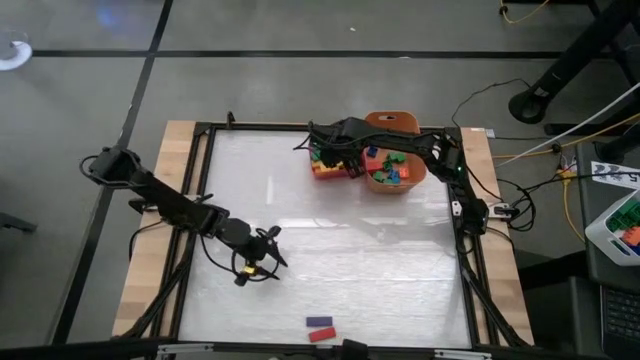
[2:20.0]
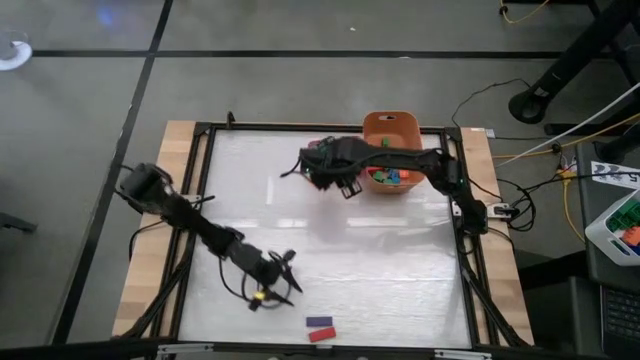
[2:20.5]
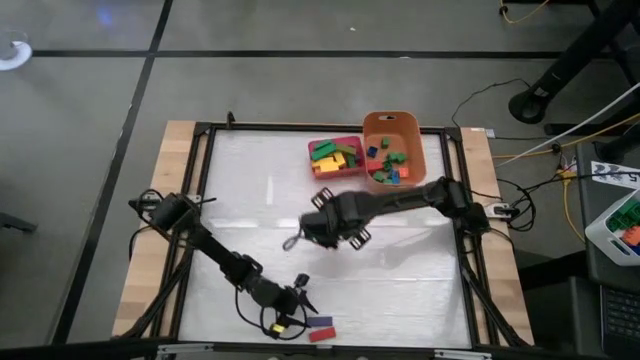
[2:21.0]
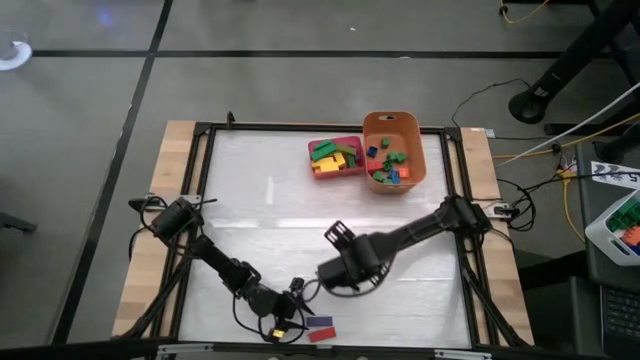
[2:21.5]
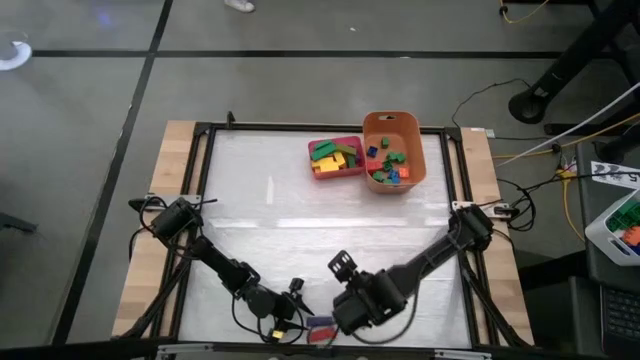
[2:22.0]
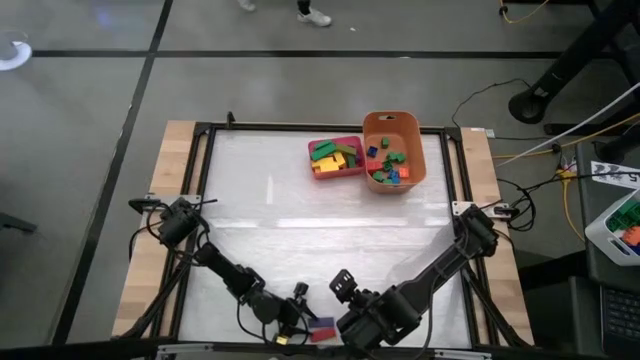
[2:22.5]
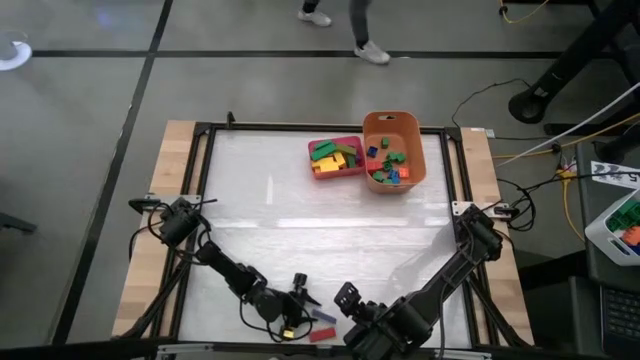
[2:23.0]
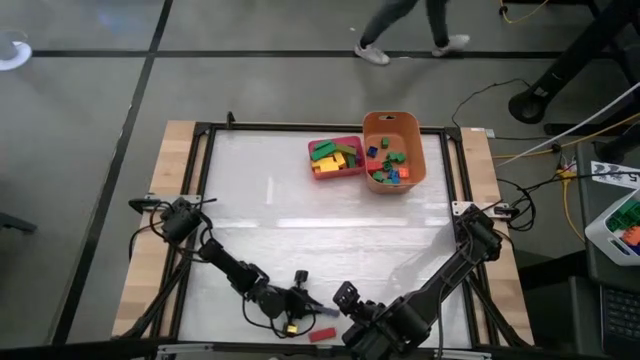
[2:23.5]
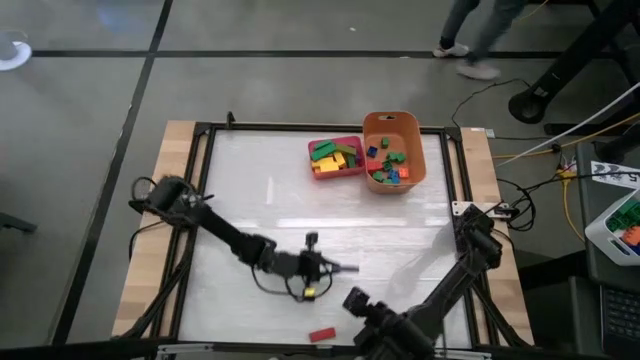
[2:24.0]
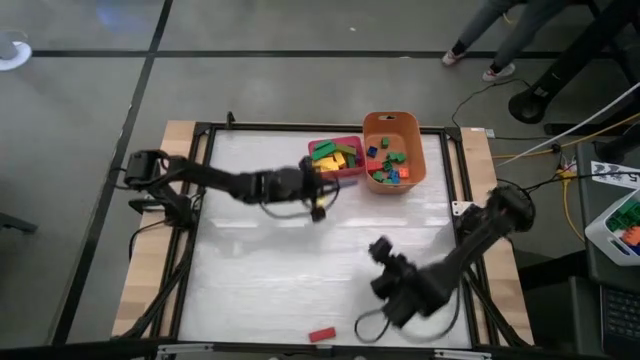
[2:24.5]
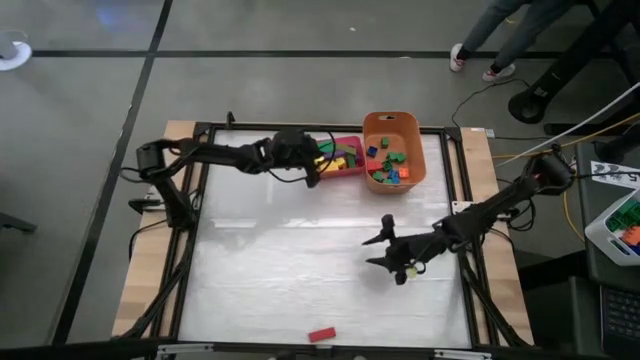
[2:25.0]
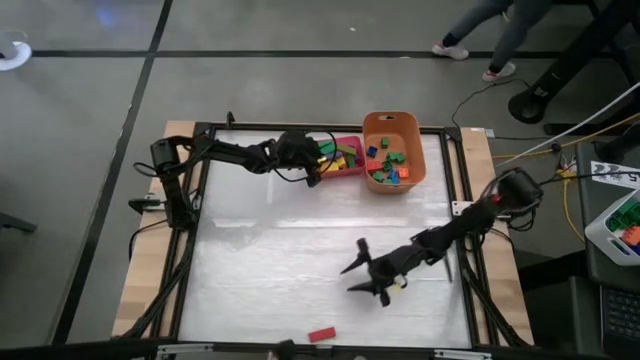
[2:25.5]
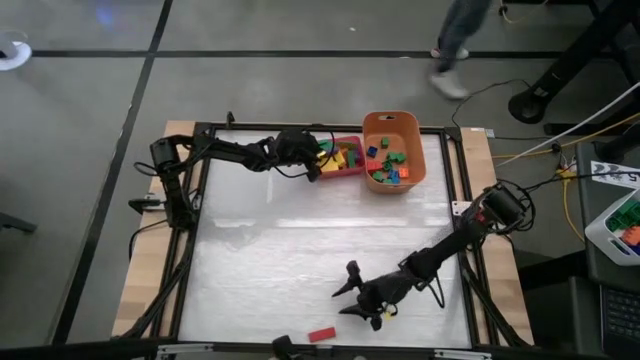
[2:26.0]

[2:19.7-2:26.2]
Task: Sort blocks by size
Put the large purple block into the pink bin

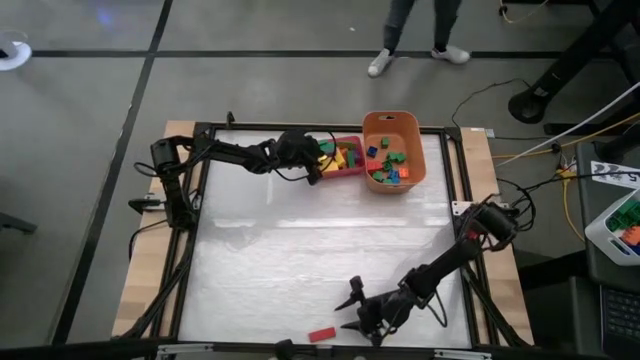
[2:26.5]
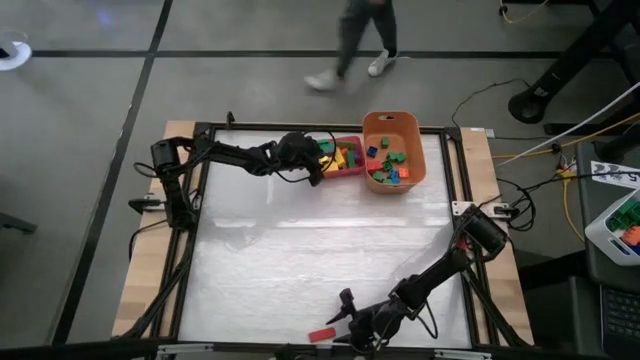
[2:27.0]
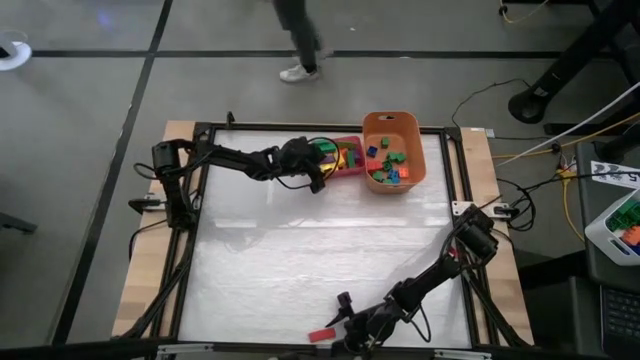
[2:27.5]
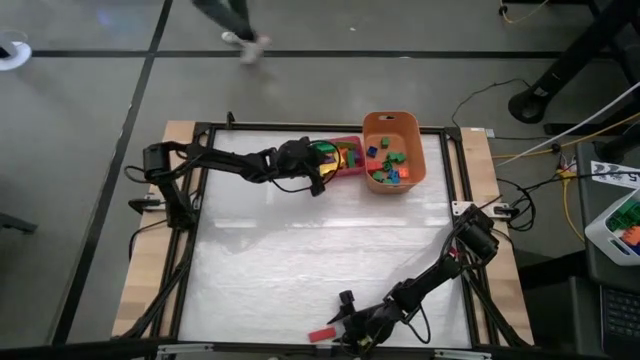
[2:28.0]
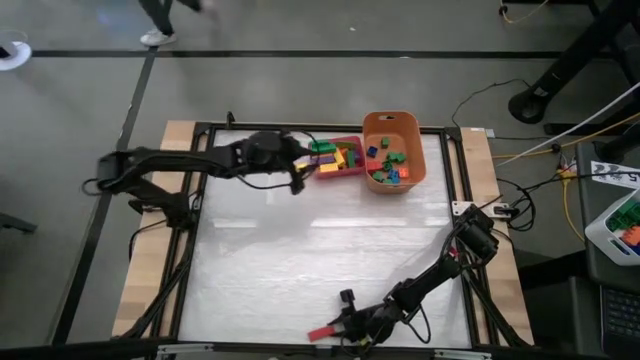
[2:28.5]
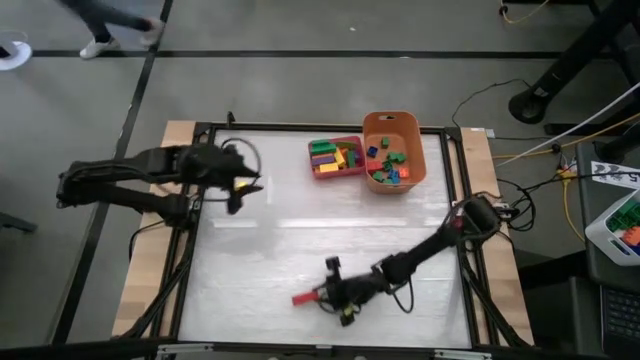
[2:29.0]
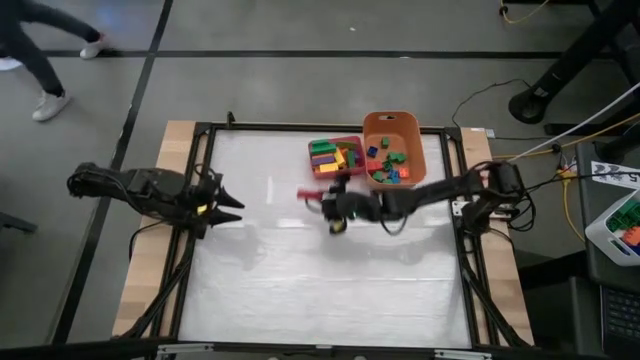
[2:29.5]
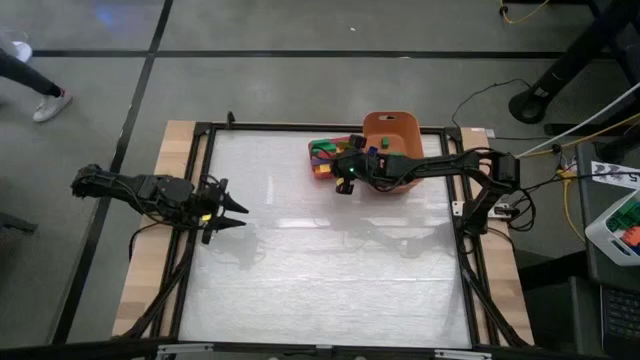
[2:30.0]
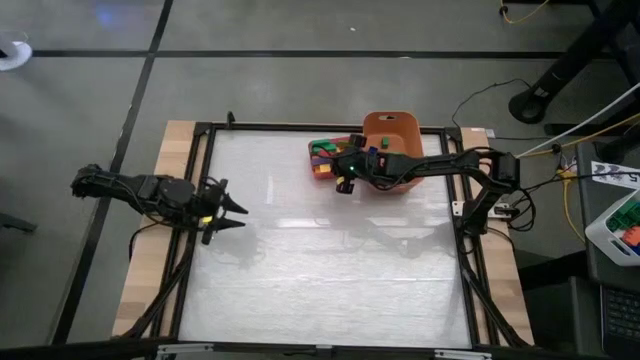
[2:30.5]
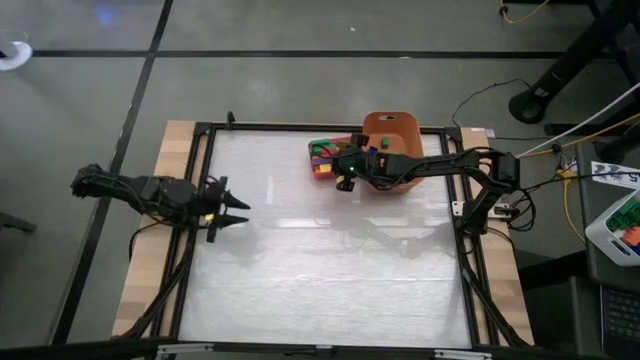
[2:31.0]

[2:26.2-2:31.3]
Put the large red block into the pink bin

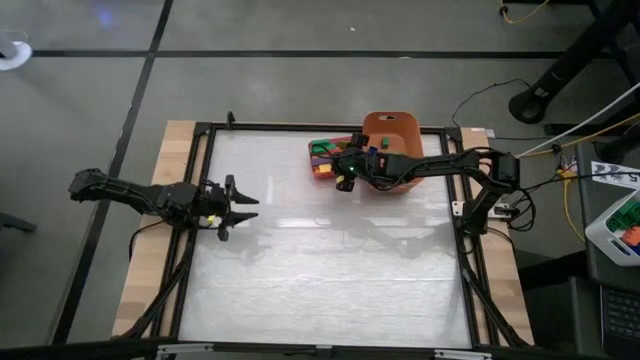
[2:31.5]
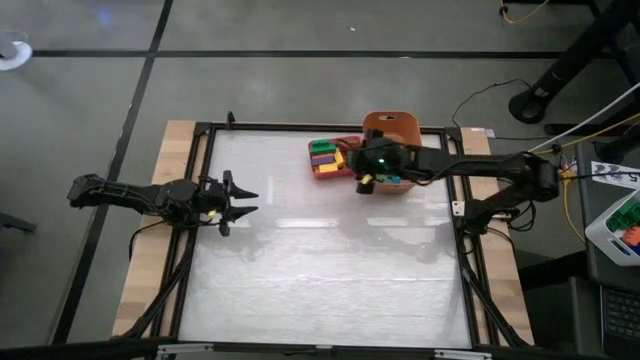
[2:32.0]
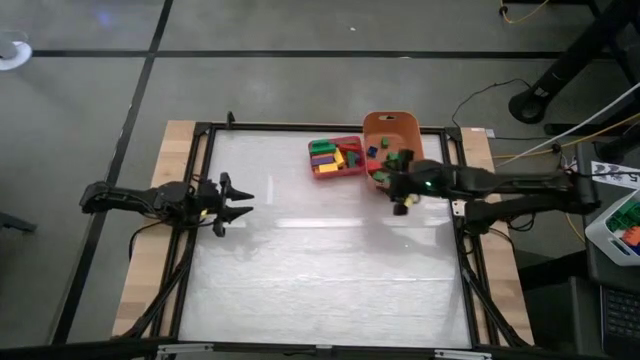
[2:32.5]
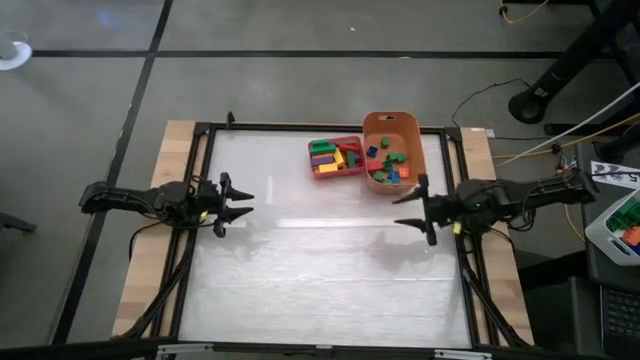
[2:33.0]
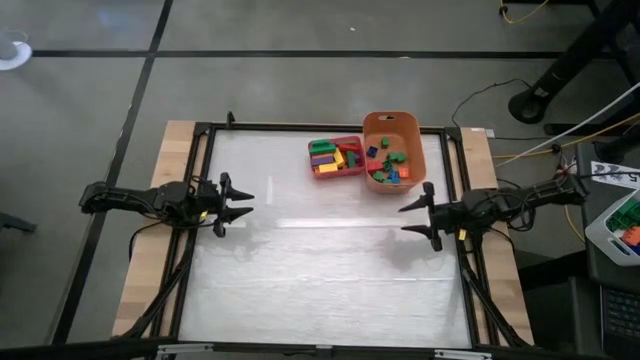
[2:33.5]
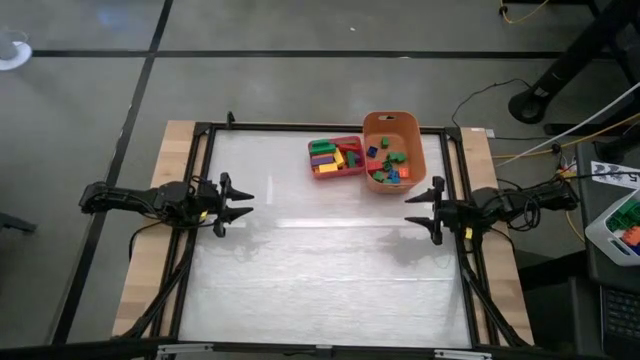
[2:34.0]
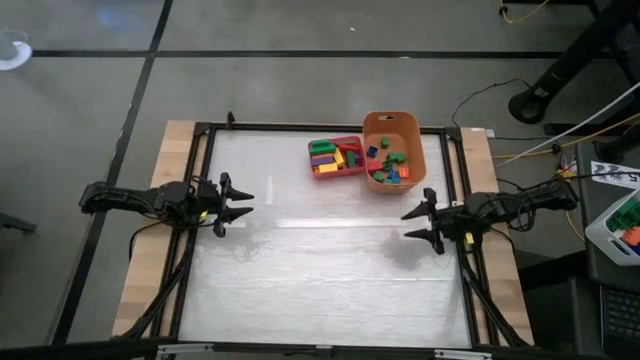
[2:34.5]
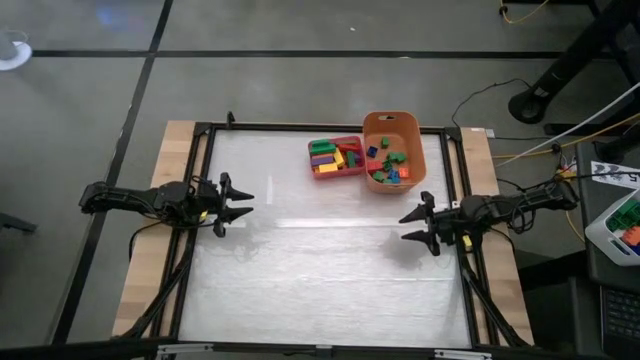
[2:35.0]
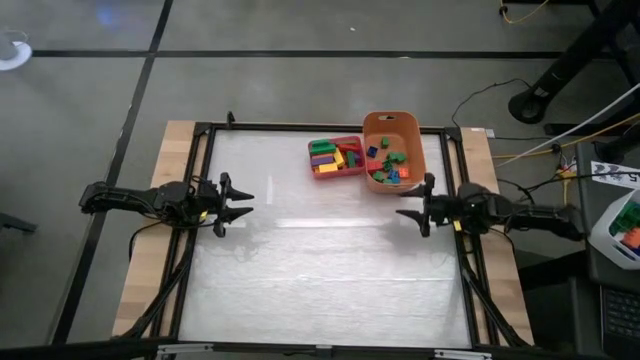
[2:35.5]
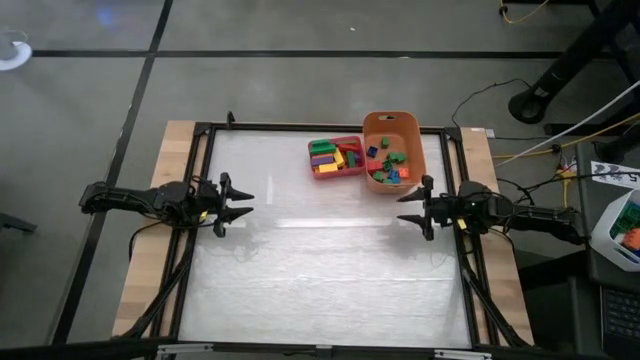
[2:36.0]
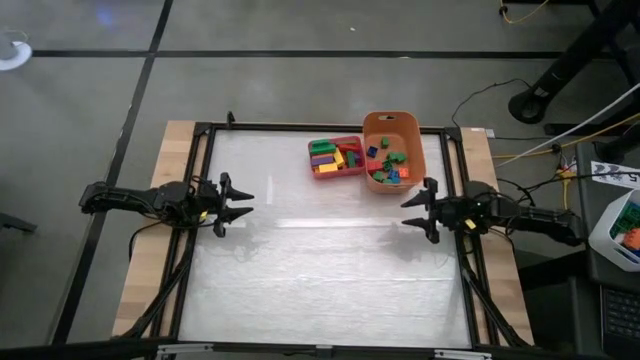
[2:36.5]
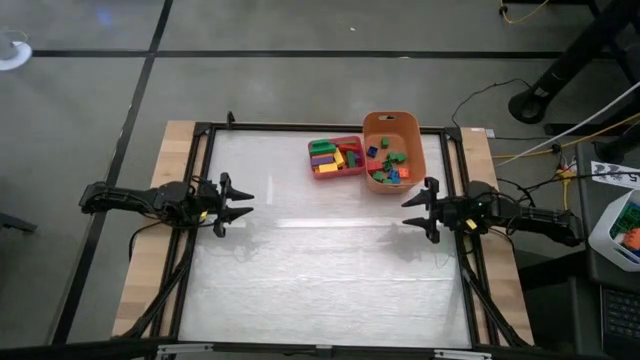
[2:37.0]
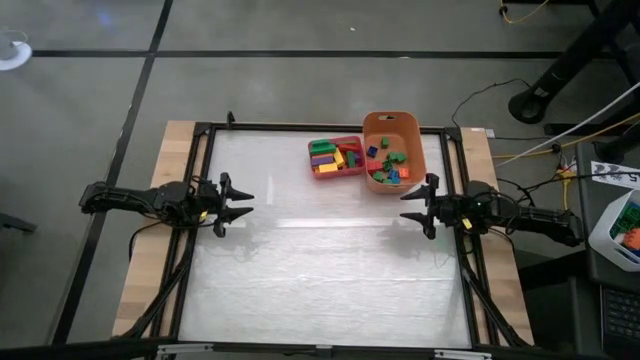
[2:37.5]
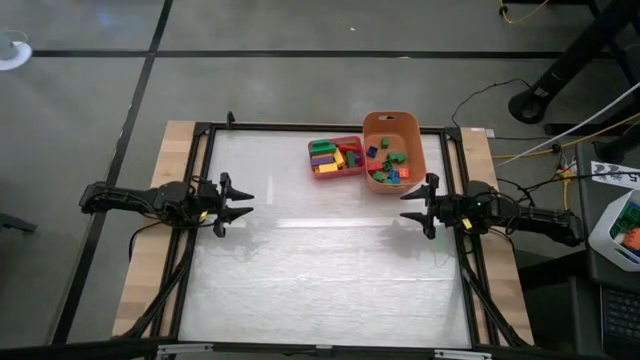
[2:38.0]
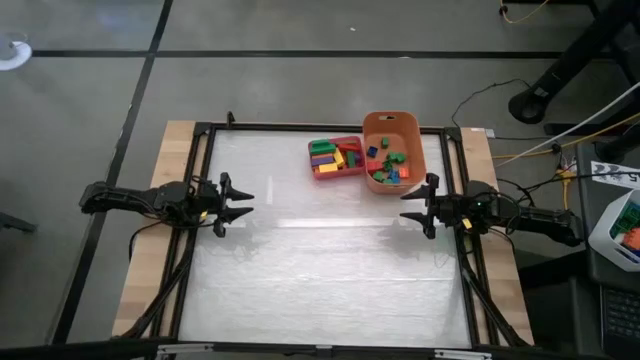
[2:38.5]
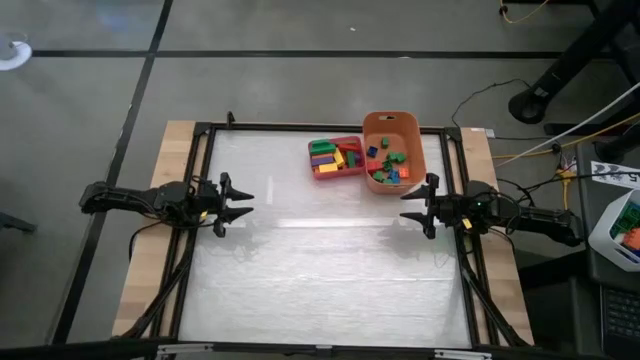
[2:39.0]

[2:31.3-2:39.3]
Return to Home Position

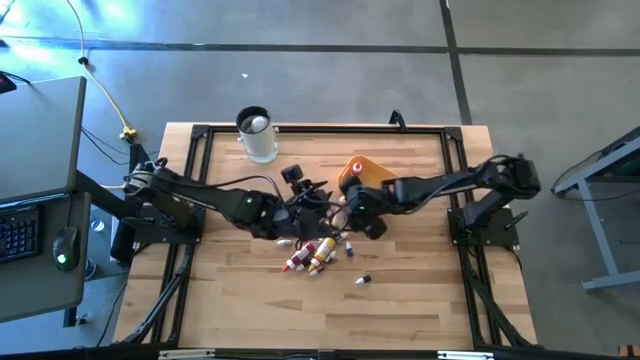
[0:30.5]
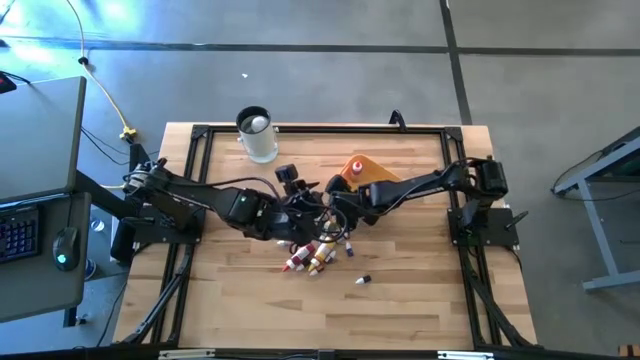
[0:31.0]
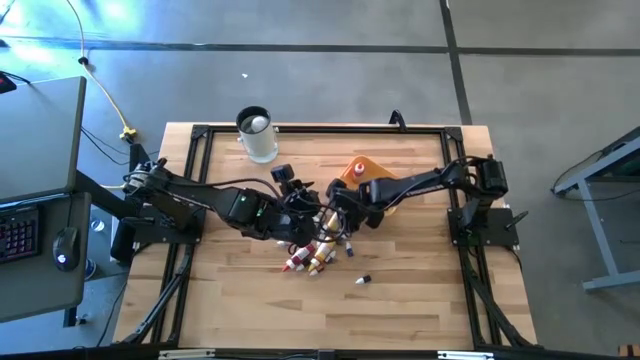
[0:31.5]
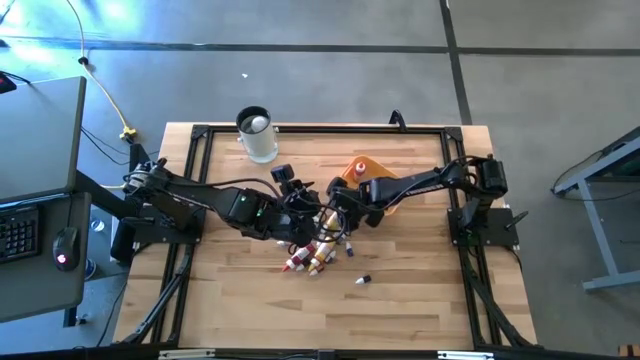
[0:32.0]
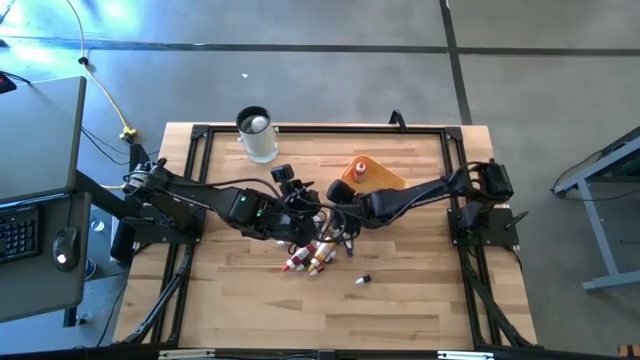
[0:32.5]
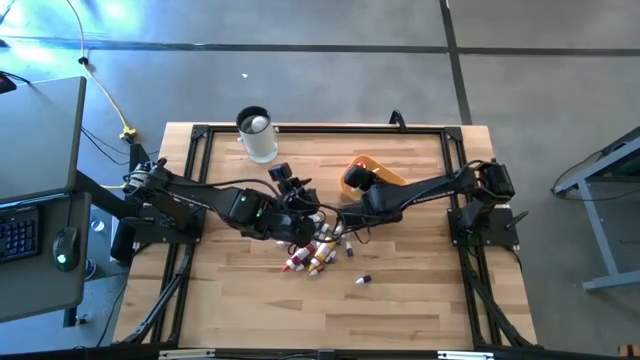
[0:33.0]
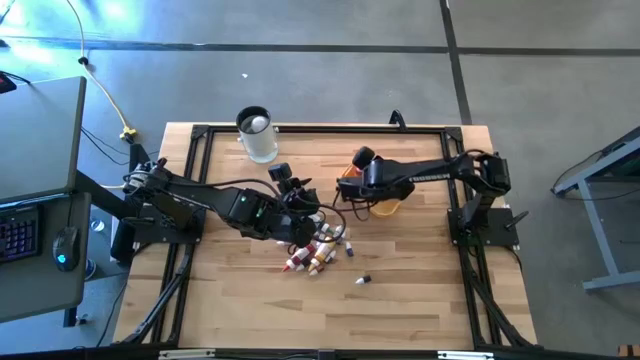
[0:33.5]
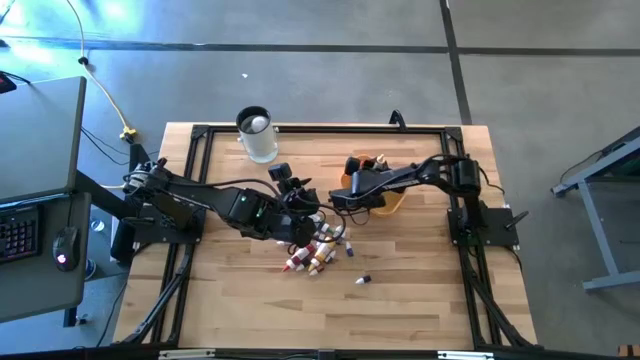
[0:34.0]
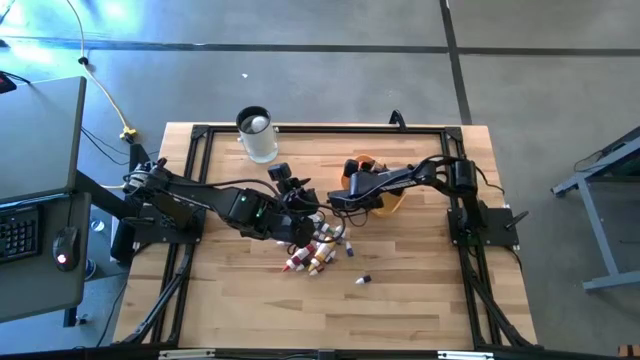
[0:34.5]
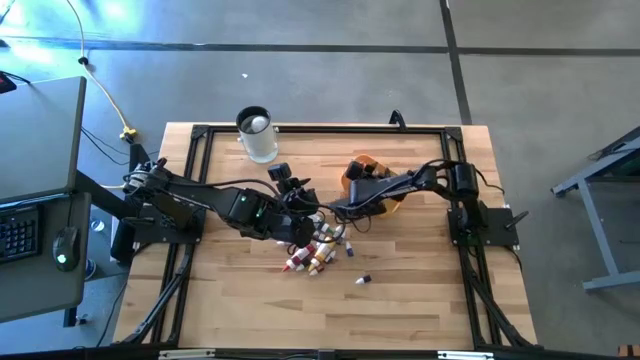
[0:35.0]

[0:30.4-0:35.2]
Task: Pick & Place food coloring
Put the right large yellow food coloring bottle into the yellow bin
